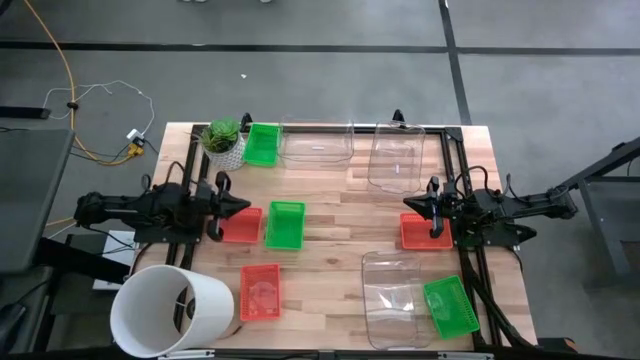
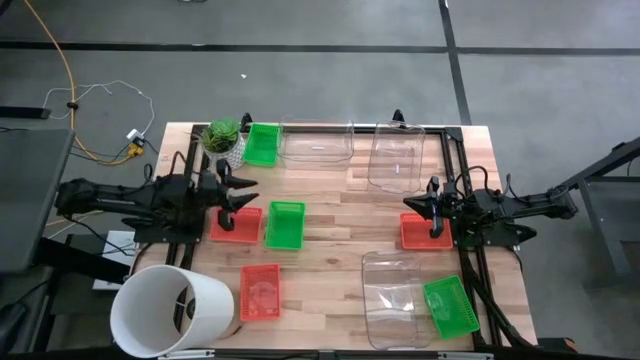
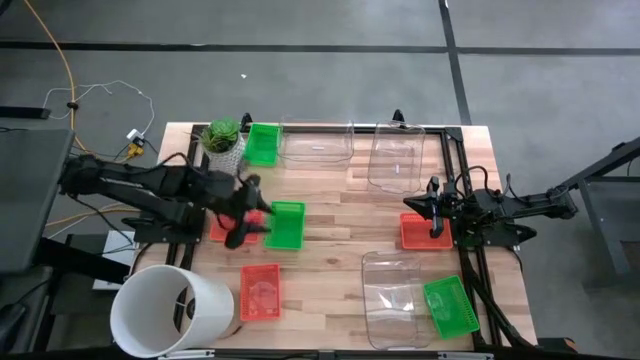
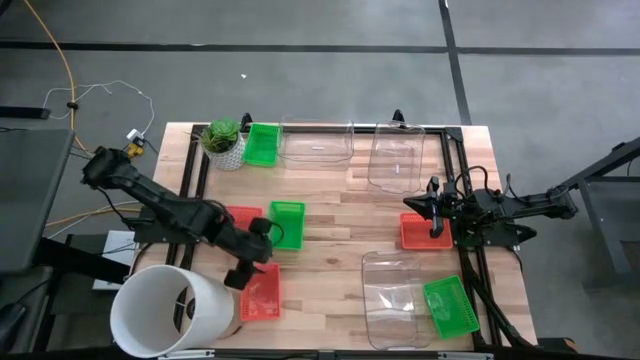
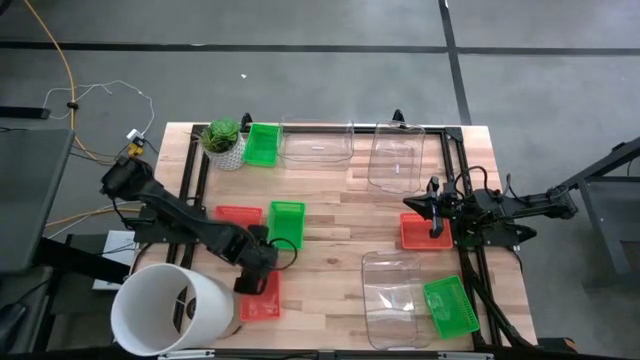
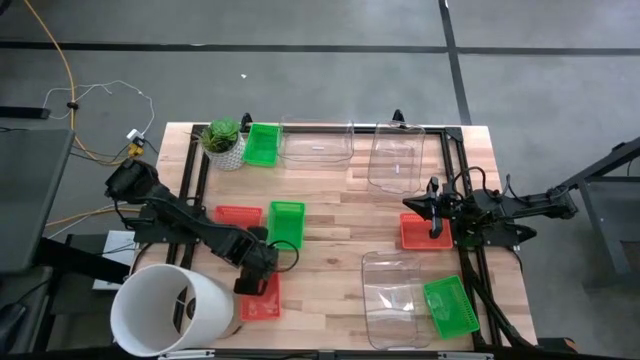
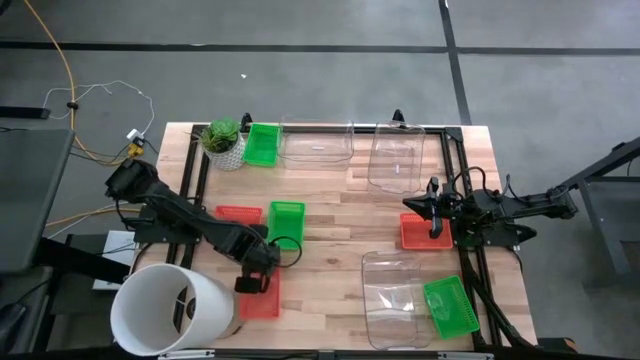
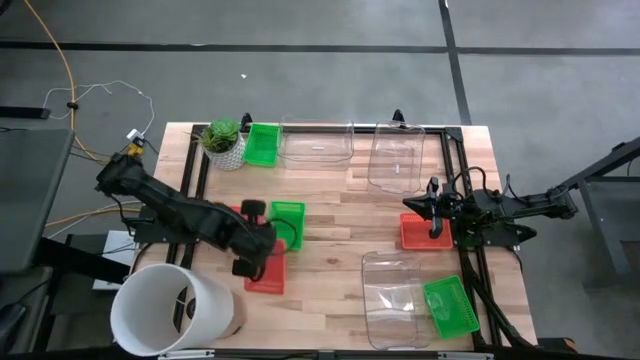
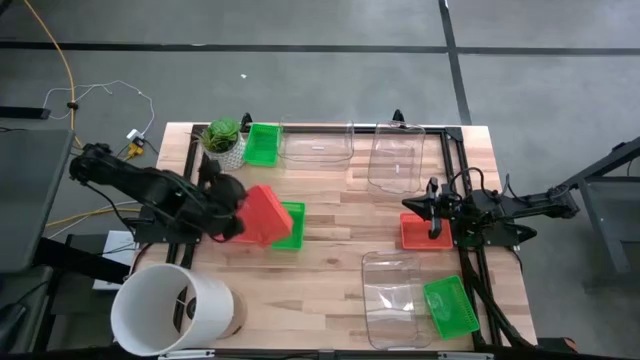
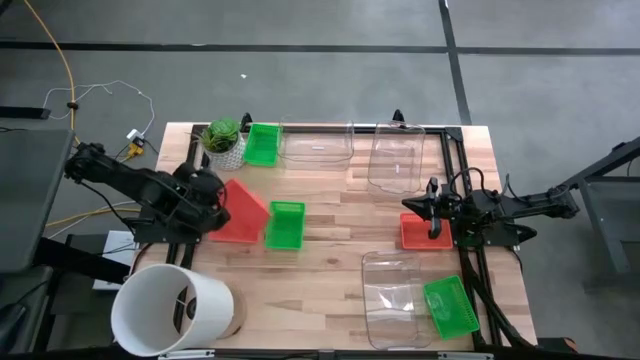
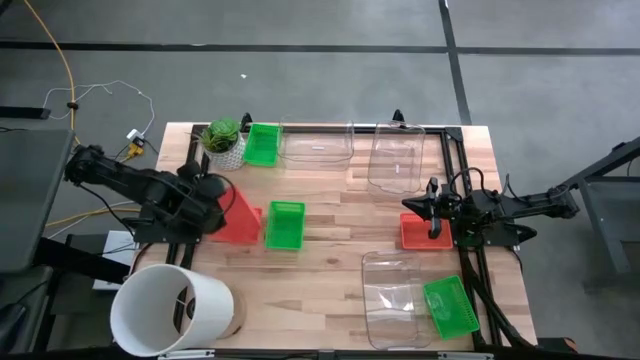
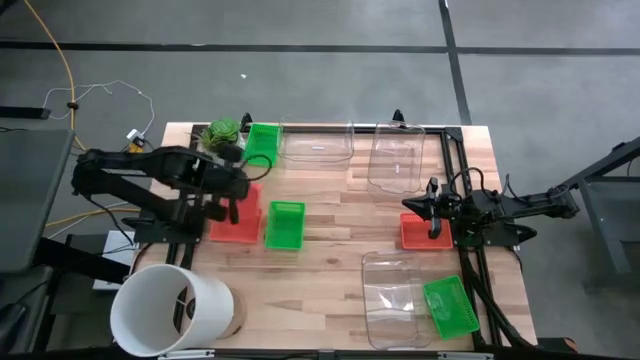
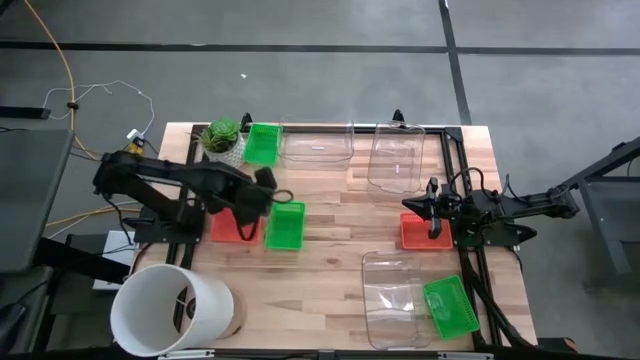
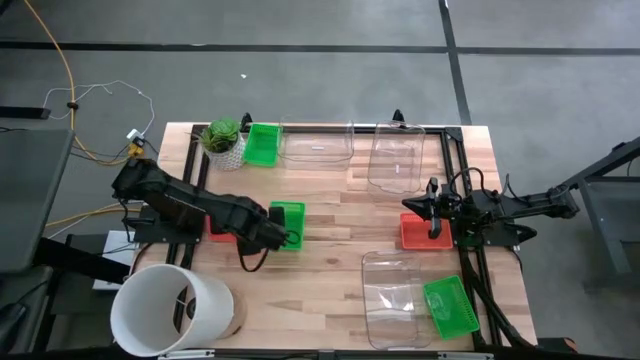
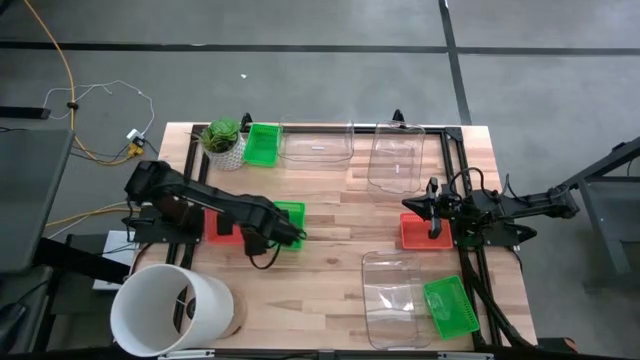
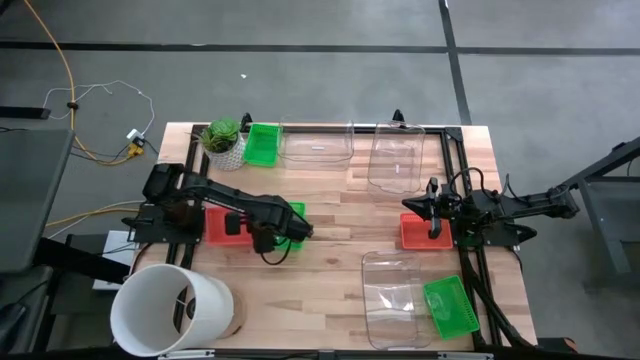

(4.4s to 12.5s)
Stack the bottom orange bin on top of the top left orange bin

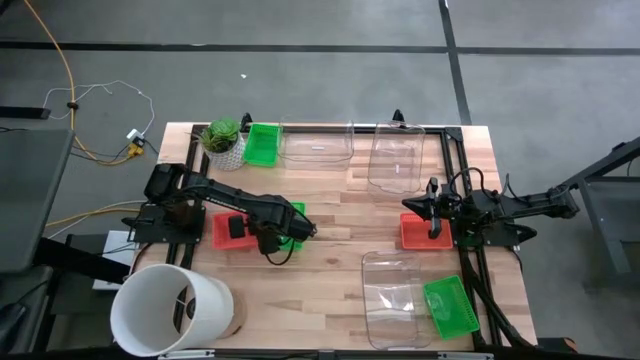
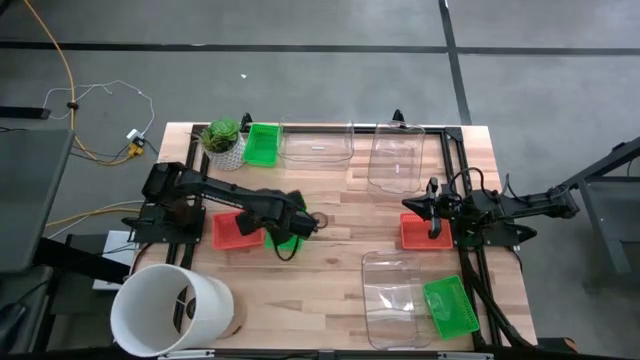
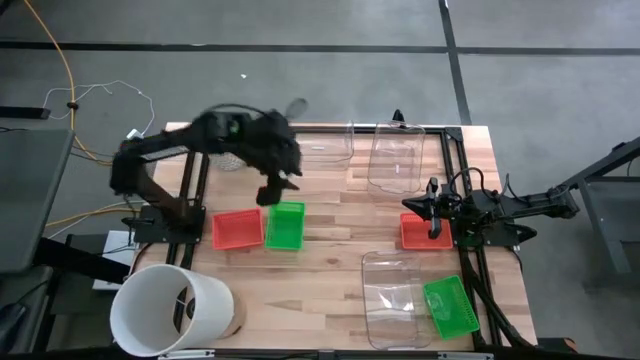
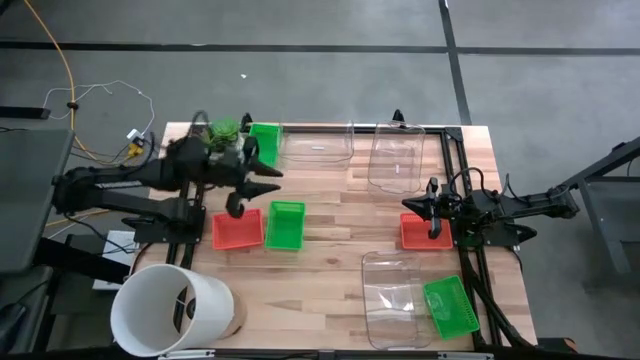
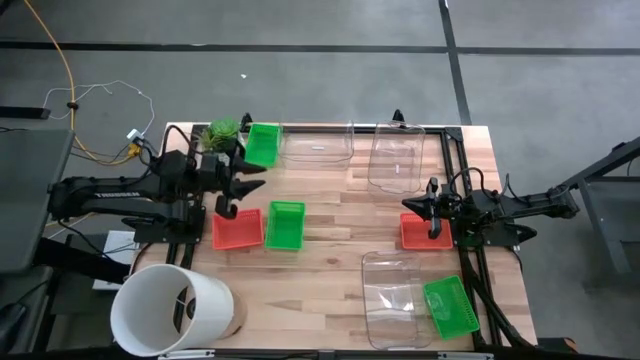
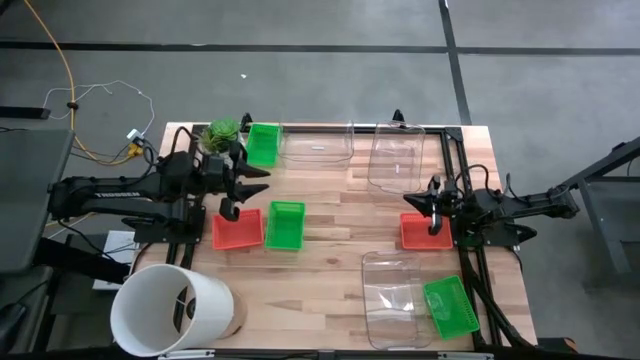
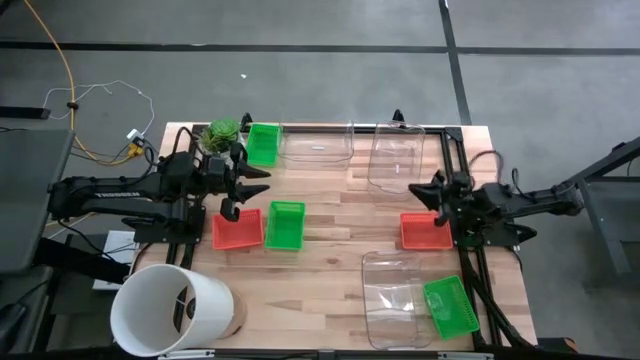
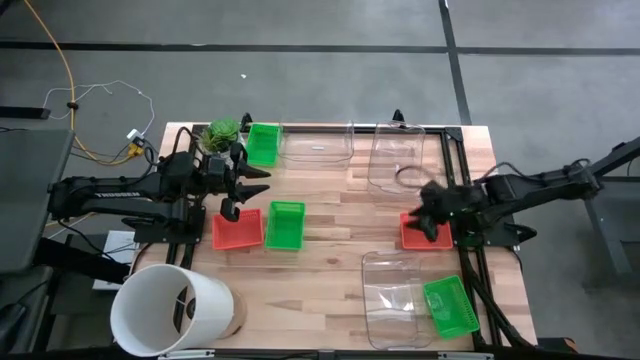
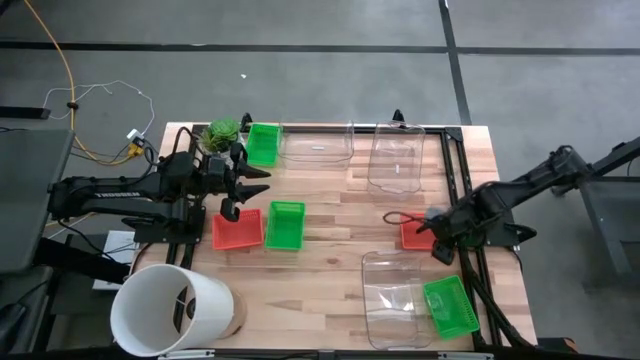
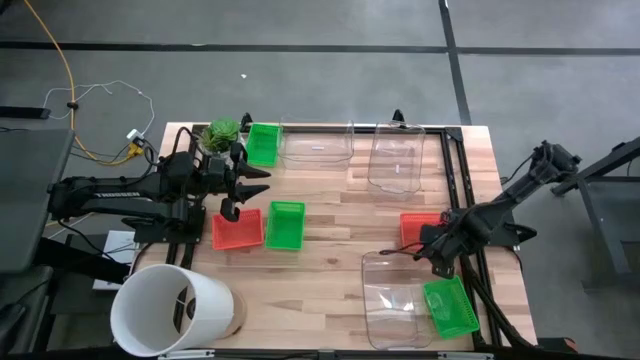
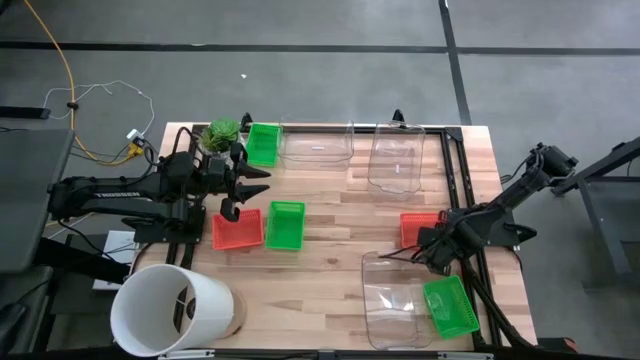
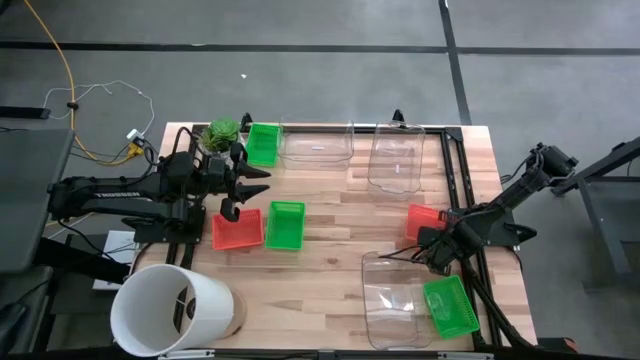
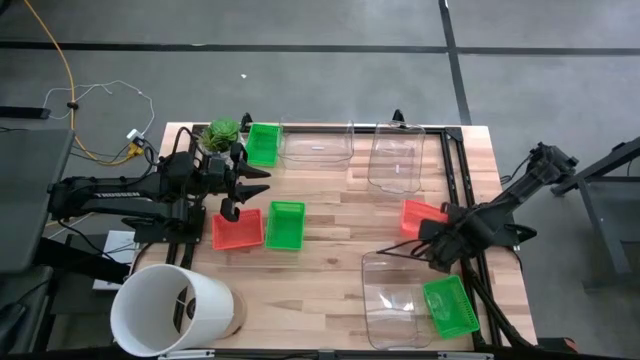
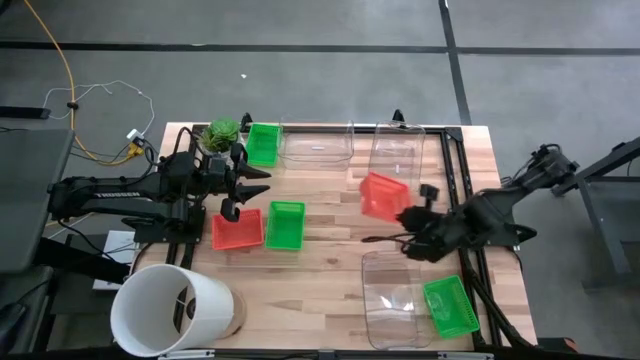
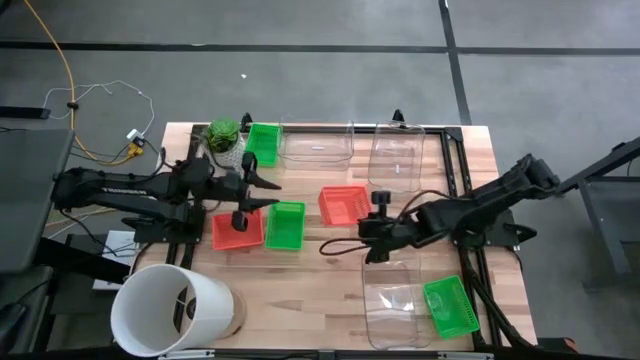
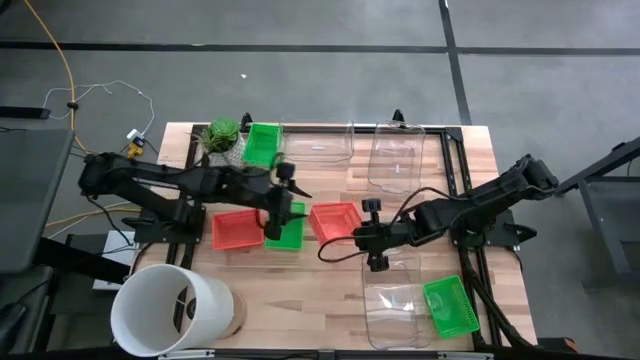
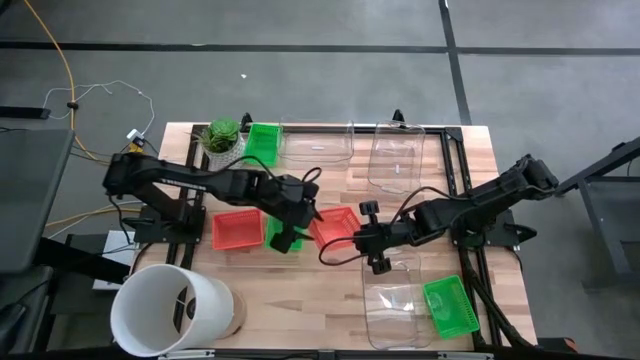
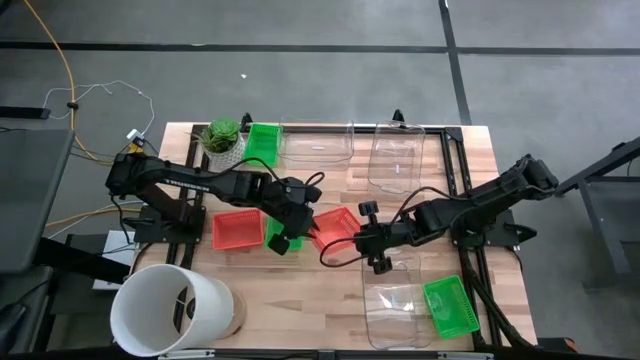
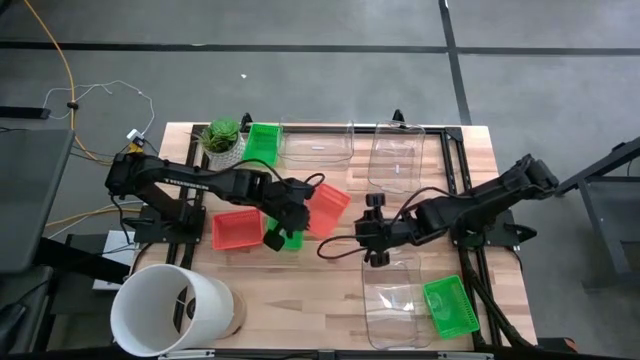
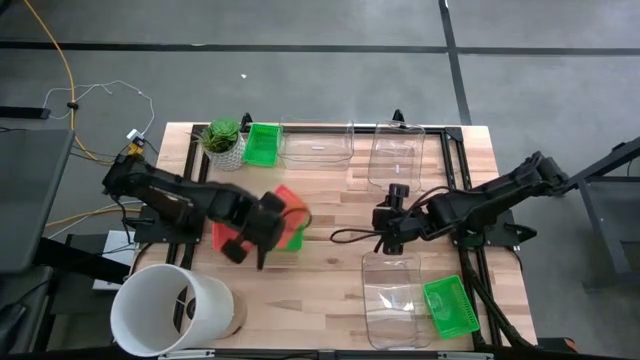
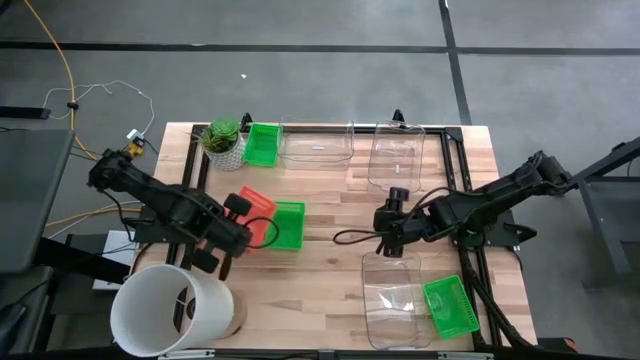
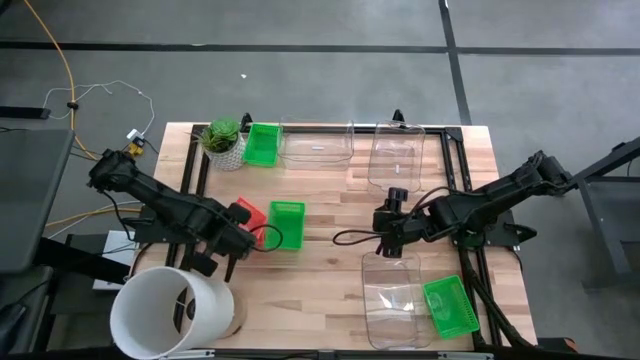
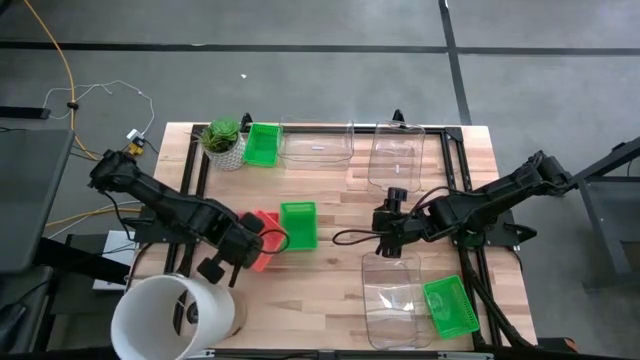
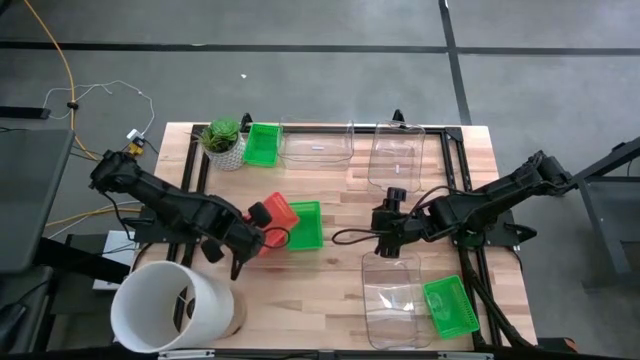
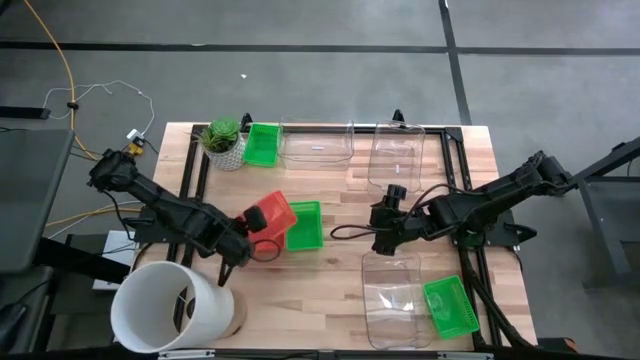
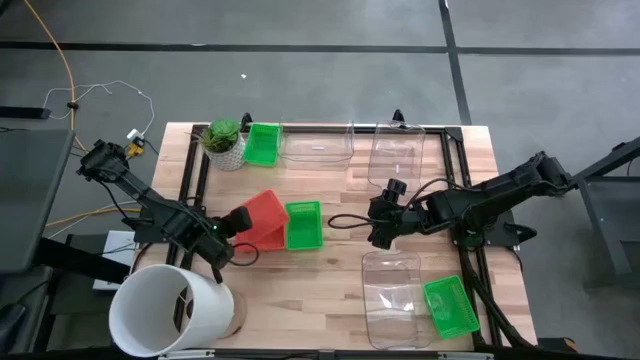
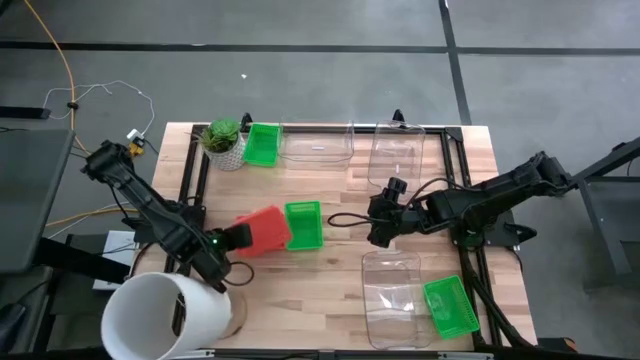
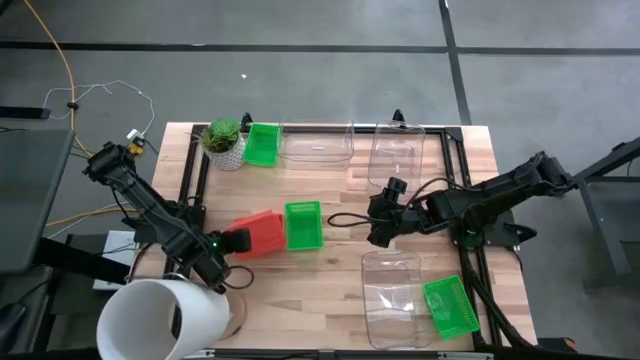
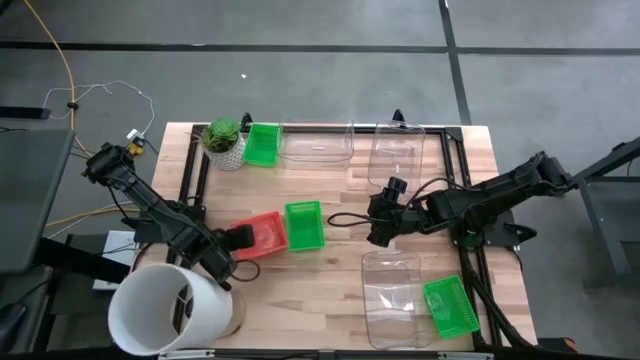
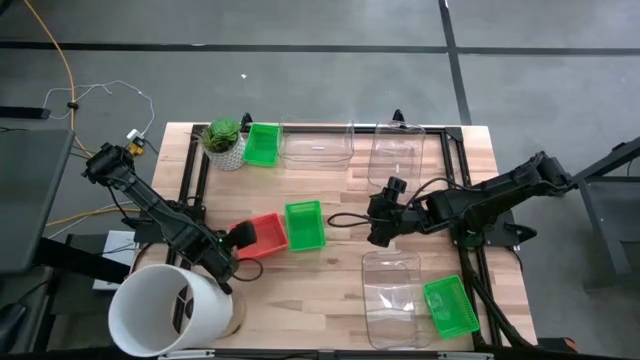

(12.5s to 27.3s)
Stack the right orange bin on top of the left orange bin
